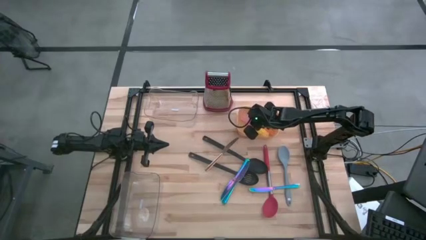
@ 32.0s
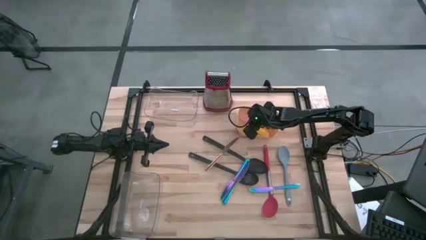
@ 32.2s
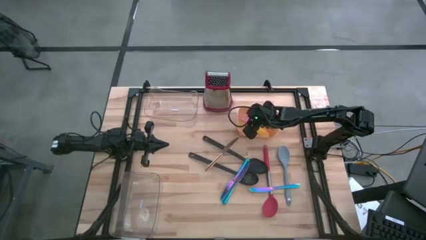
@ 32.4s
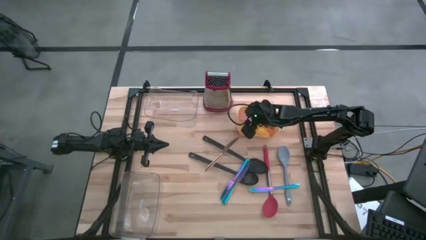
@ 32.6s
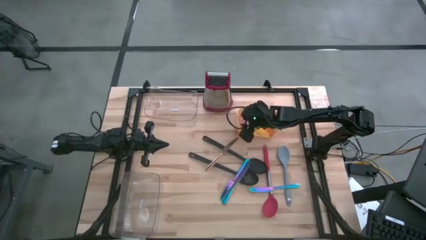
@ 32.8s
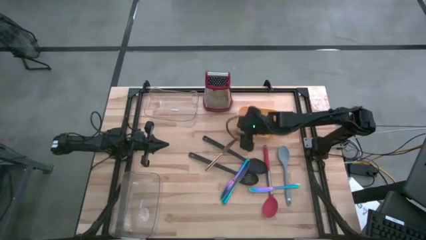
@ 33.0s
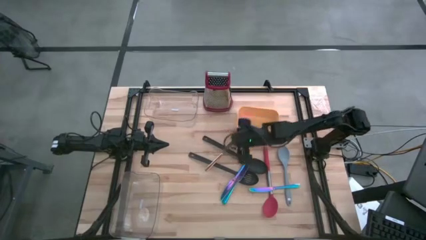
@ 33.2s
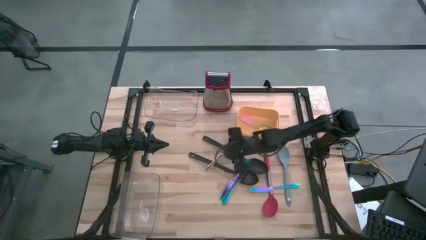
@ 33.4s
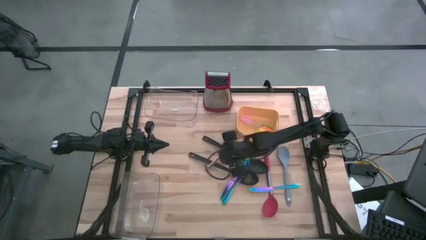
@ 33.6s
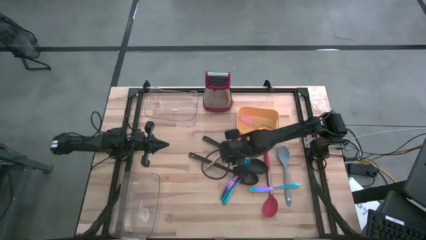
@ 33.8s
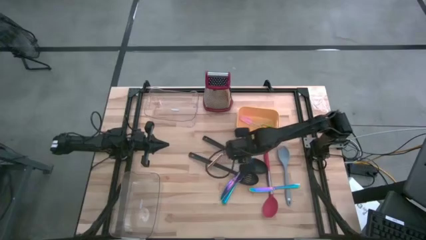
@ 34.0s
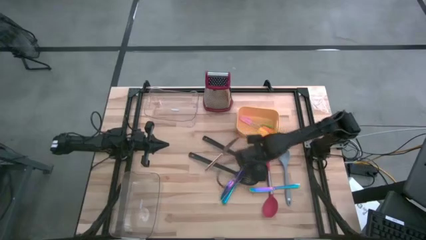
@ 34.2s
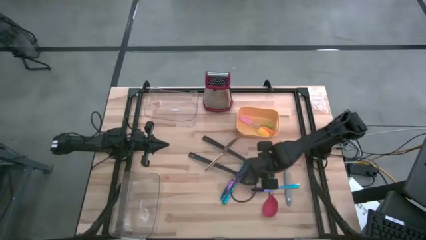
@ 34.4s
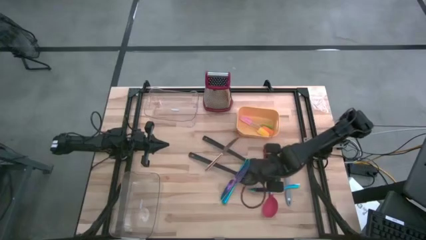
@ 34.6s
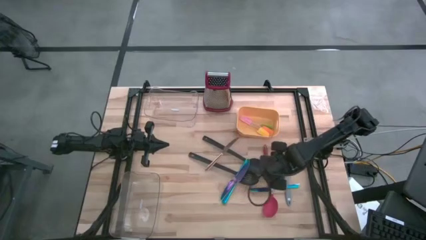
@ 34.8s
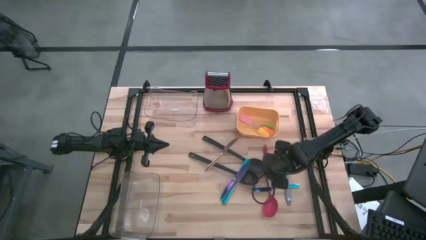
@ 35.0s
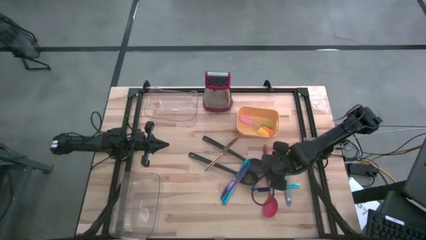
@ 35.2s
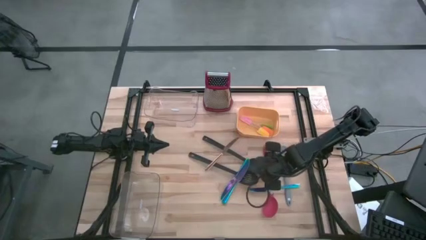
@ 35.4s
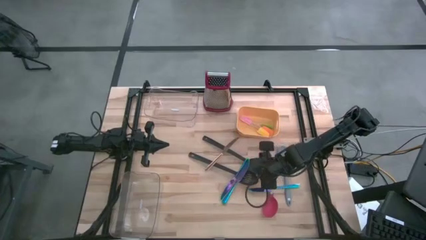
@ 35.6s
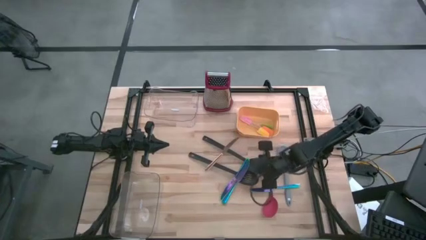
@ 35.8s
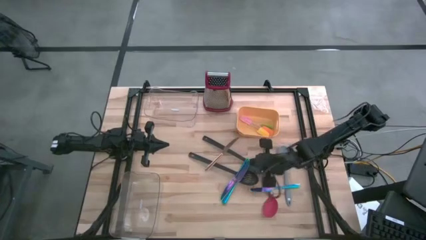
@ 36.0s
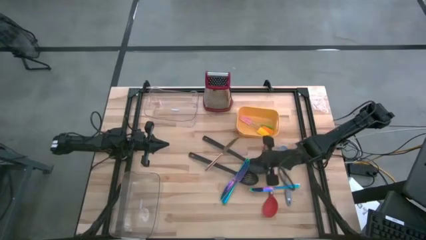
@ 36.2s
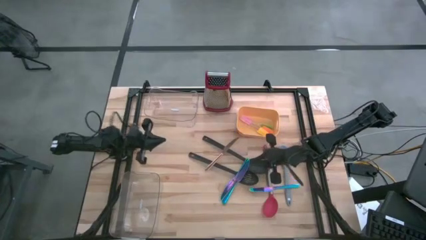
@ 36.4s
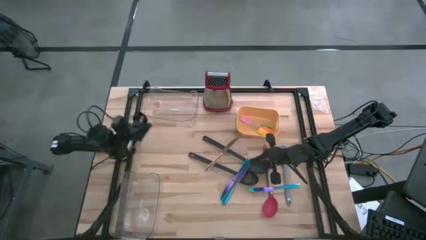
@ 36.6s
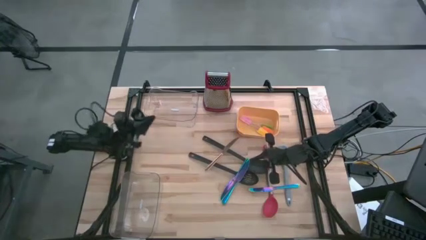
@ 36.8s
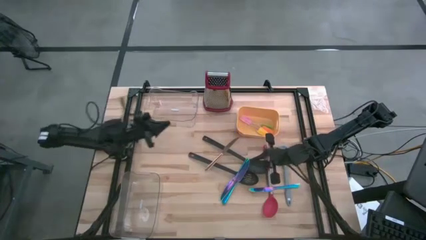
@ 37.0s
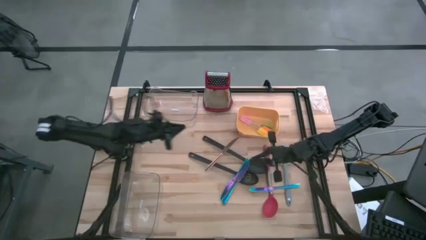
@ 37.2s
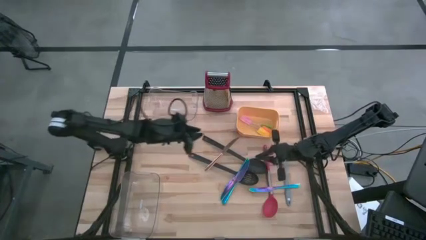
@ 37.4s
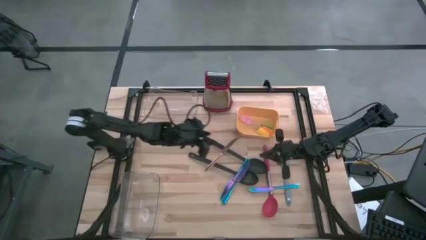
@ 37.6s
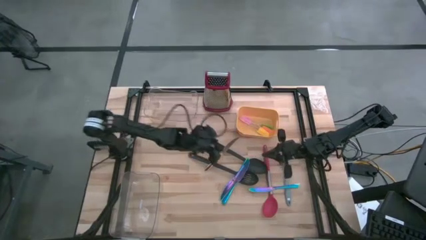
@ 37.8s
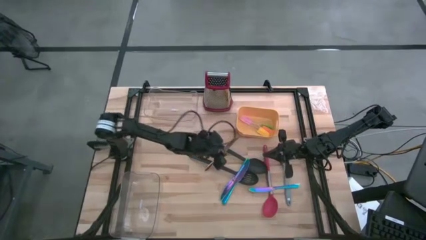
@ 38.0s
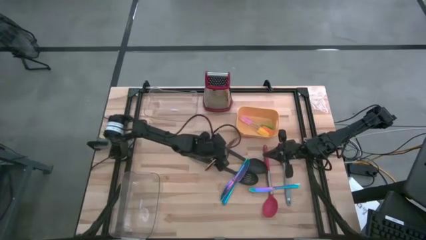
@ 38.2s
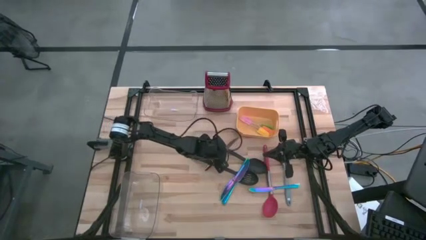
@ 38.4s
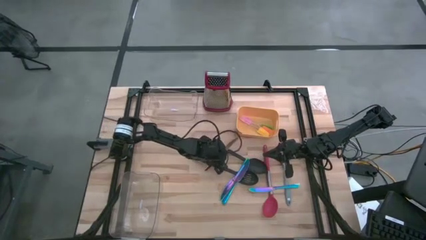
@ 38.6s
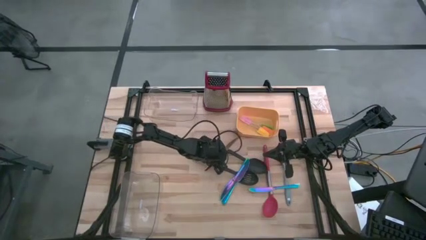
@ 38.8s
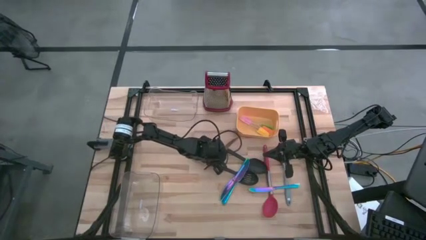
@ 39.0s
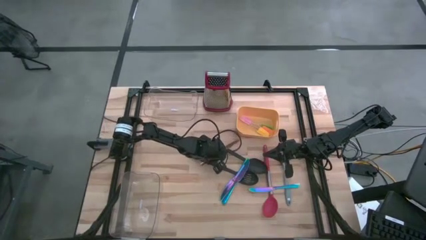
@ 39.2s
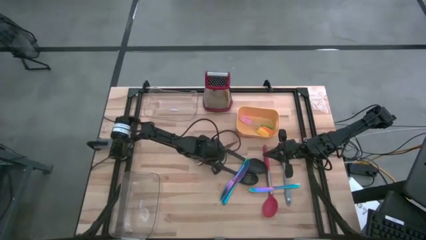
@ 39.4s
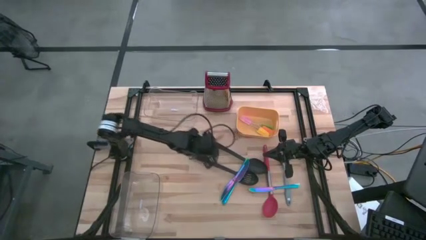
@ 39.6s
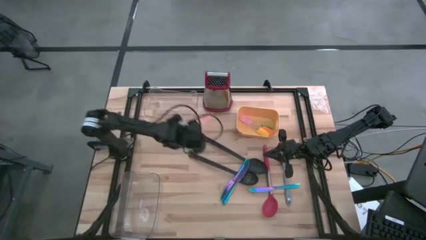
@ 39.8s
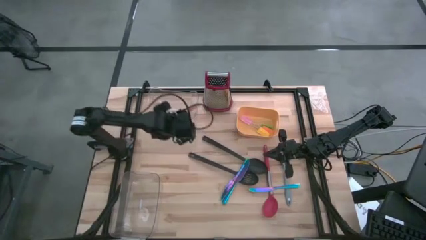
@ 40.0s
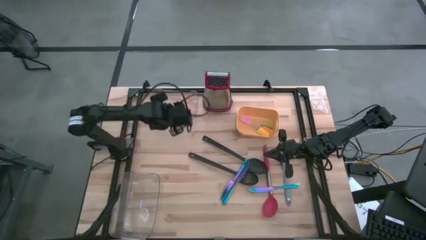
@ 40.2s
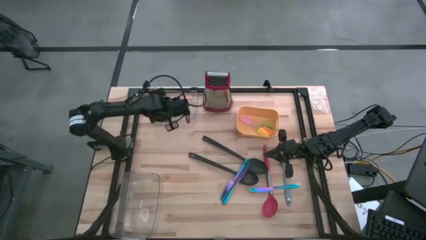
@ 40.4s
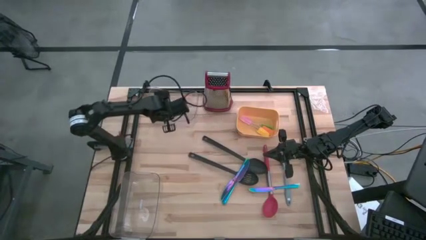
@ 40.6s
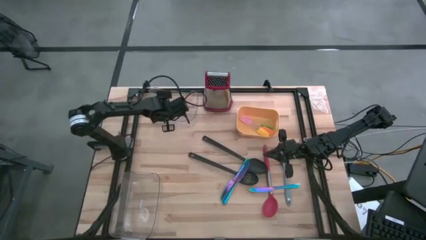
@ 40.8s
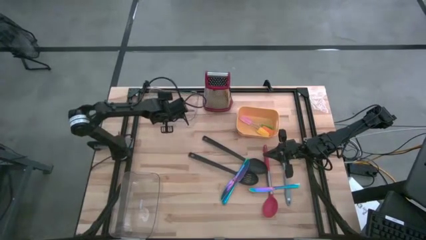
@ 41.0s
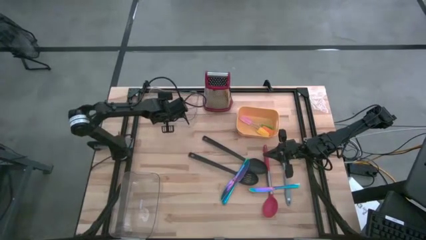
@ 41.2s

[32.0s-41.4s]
Task: Pick & Place Kitchen Items
Put the brown knife into the top transparent bin

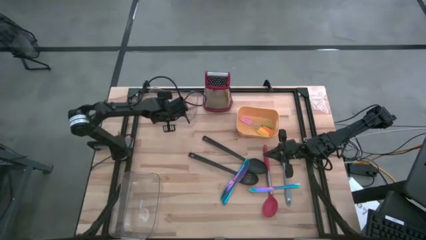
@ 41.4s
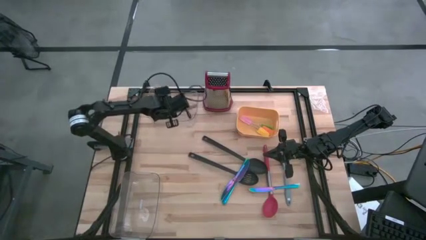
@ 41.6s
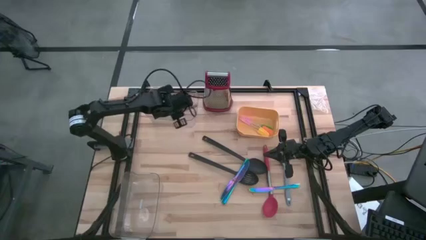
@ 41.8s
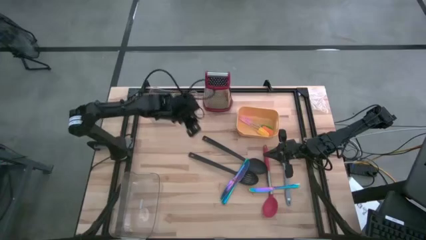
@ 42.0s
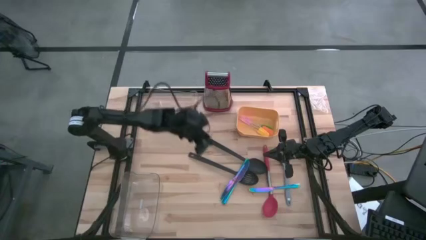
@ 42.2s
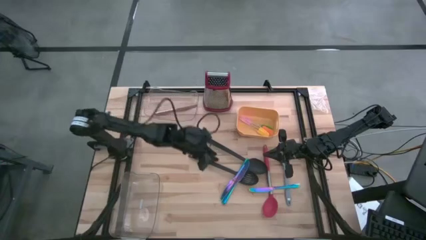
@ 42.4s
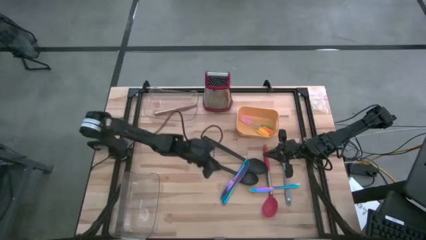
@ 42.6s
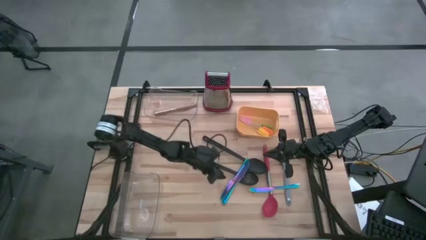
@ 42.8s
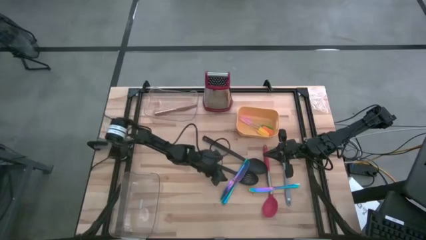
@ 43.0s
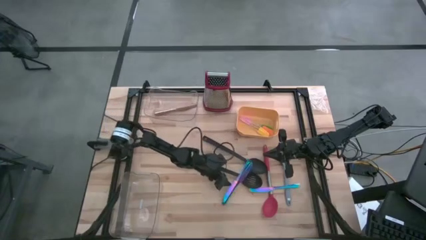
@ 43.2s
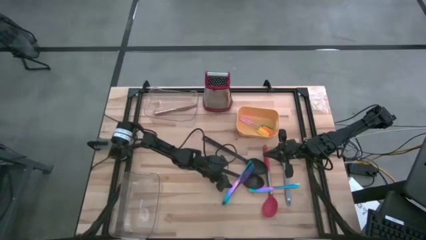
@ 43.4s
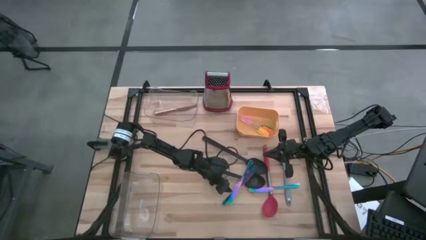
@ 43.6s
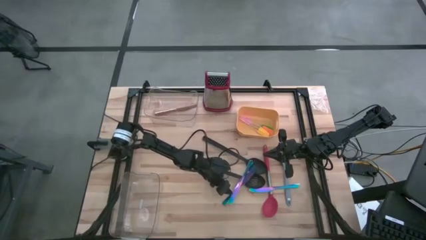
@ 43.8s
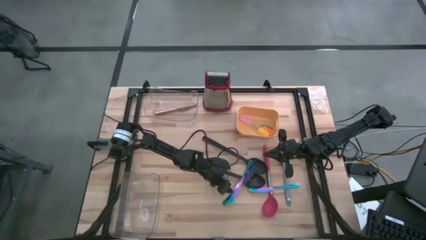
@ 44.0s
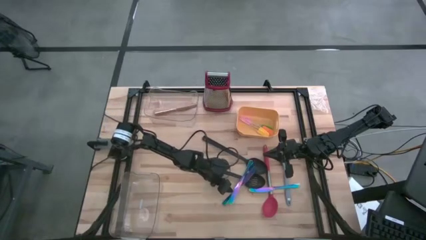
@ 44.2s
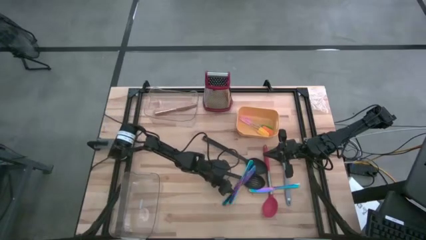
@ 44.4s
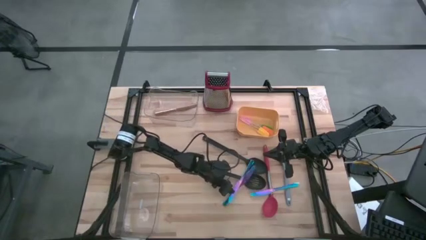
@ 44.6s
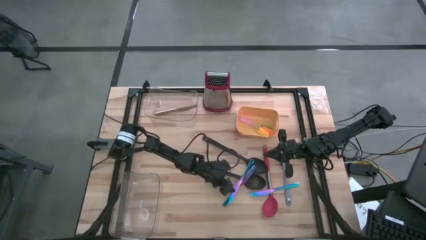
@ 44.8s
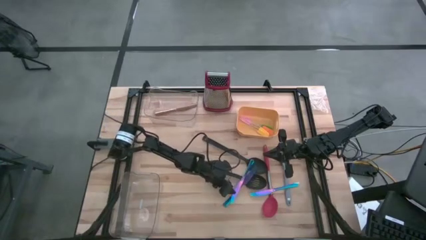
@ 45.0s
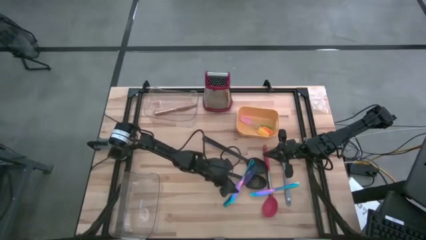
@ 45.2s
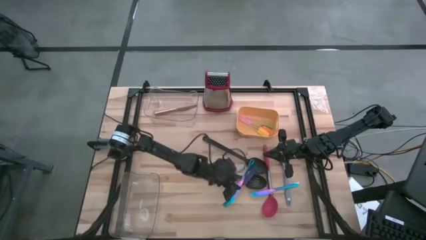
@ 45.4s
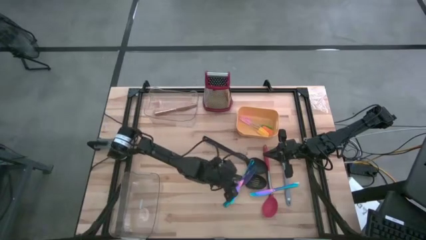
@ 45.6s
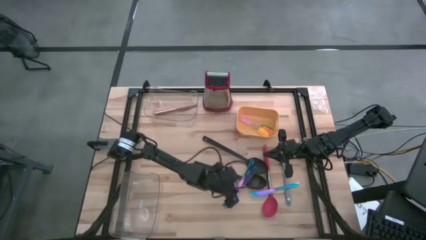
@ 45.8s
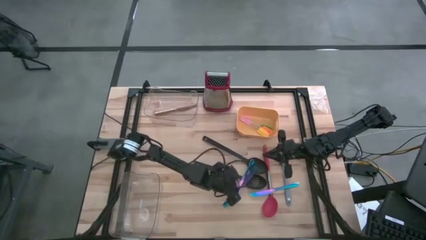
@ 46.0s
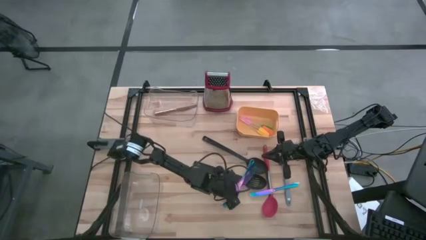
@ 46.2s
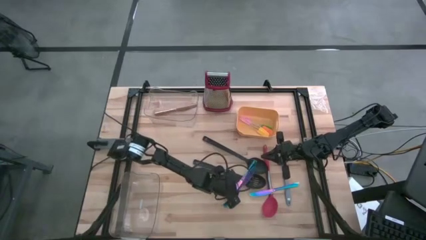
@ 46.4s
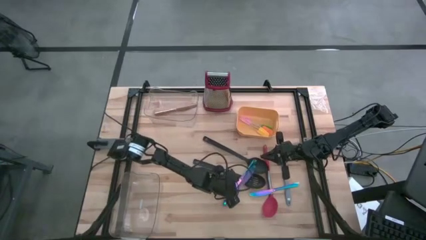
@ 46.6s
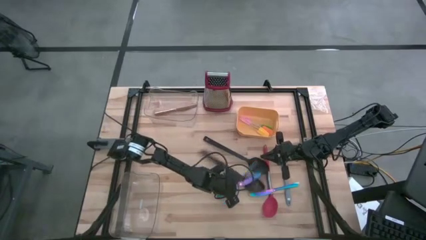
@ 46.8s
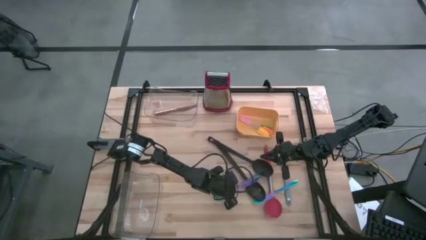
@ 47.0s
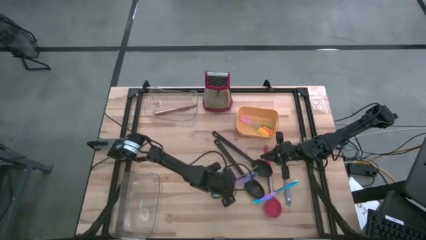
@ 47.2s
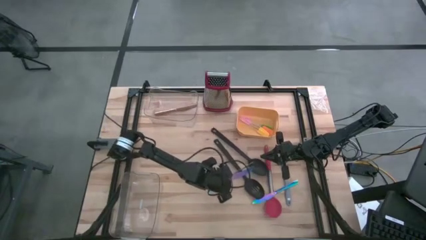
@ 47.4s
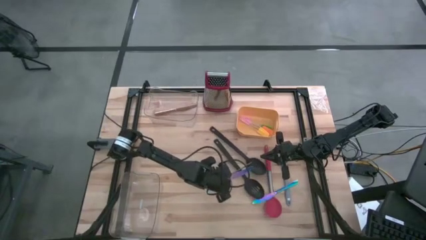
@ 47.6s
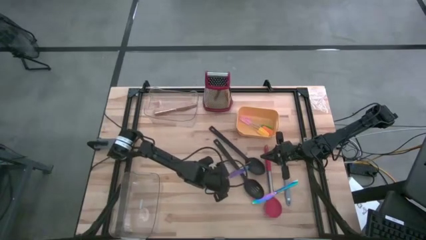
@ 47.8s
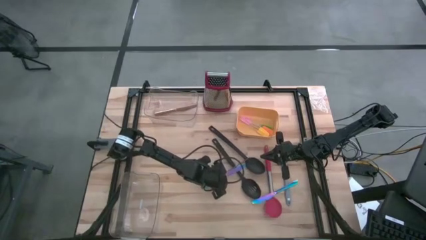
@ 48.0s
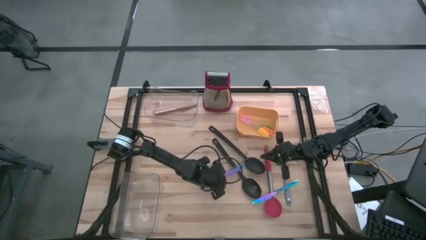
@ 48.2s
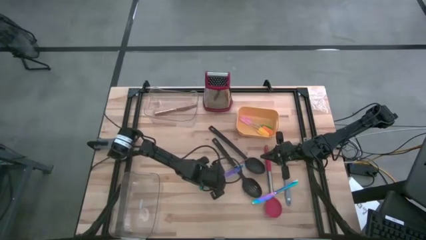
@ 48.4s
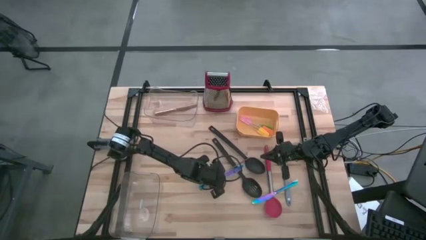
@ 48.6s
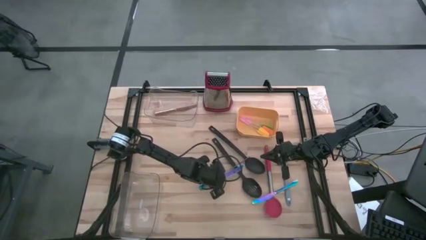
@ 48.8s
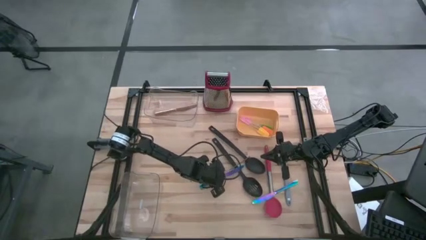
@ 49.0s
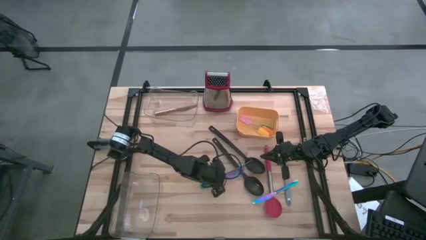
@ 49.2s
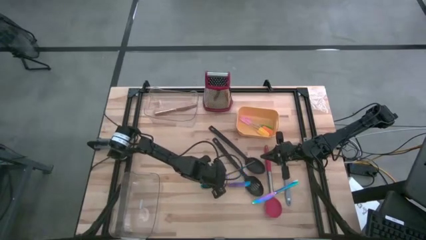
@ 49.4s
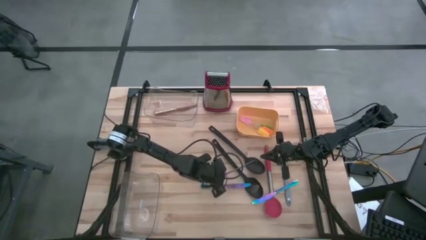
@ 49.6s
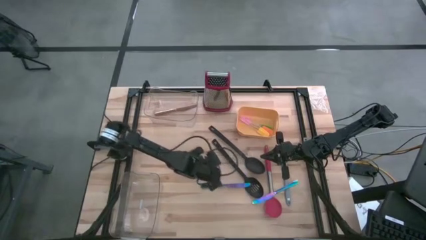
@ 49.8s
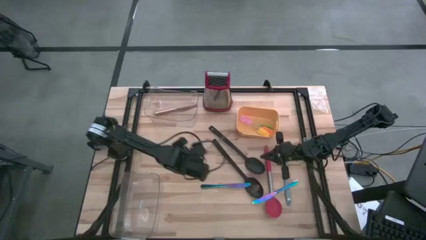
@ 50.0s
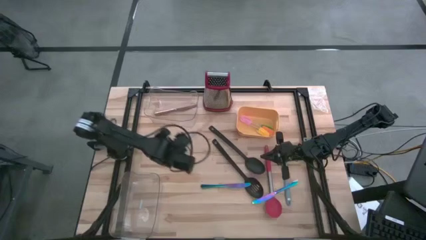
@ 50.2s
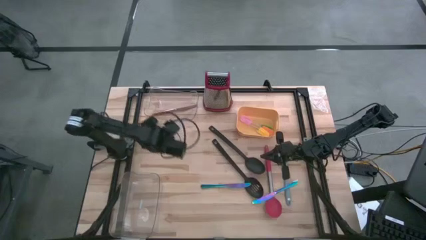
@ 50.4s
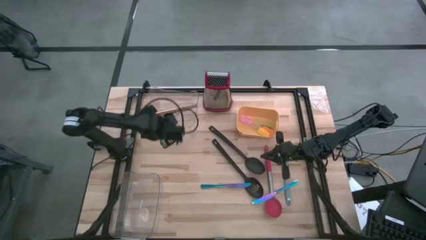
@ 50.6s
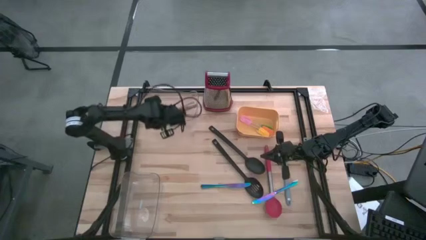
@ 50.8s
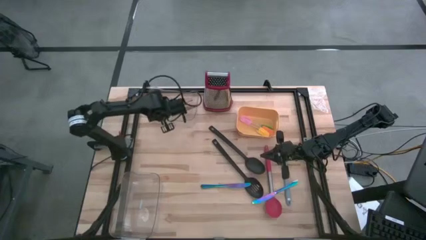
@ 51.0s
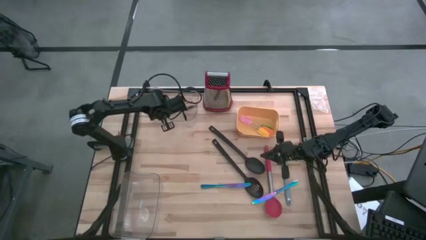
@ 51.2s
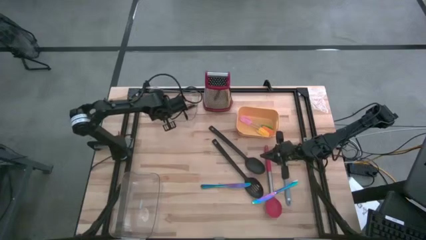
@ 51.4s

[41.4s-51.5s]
Put the blue knife into the top transparent bin
